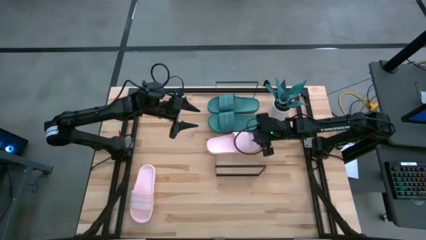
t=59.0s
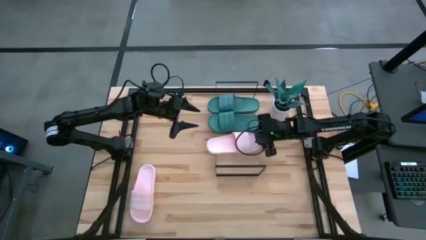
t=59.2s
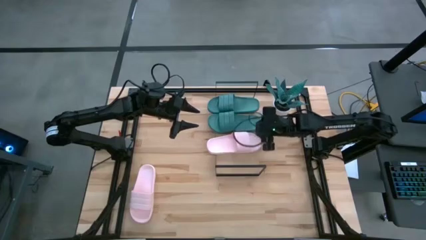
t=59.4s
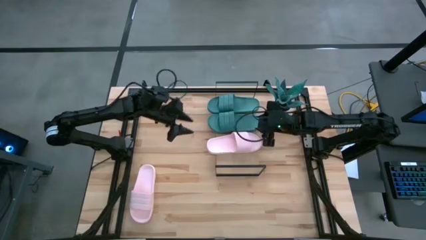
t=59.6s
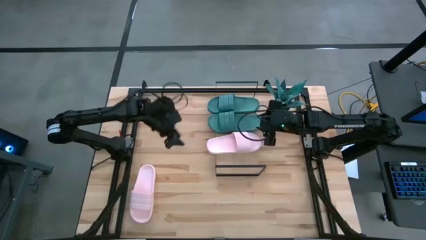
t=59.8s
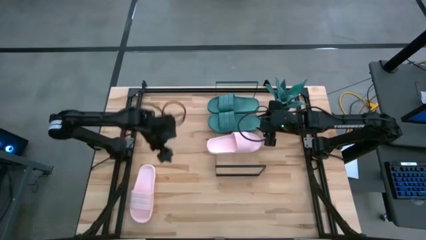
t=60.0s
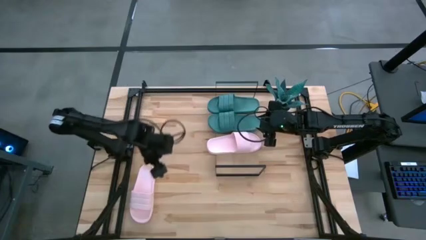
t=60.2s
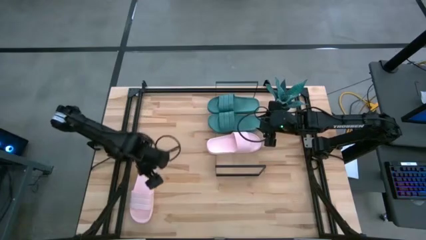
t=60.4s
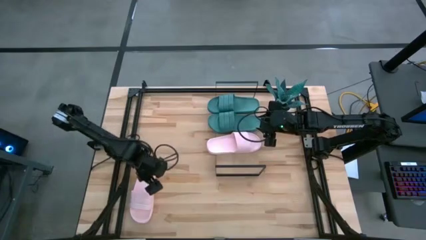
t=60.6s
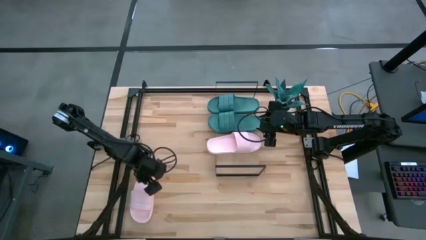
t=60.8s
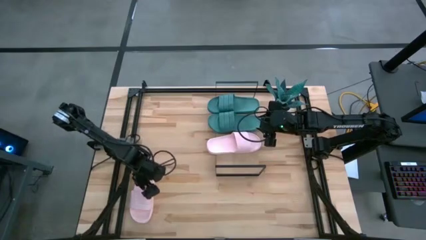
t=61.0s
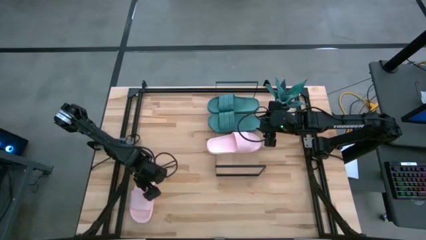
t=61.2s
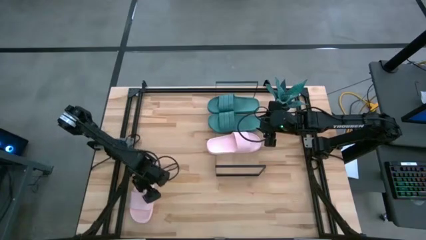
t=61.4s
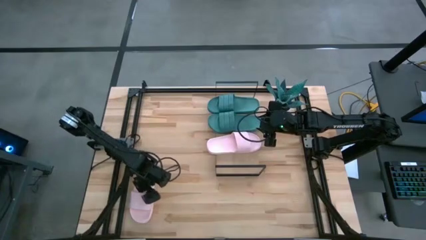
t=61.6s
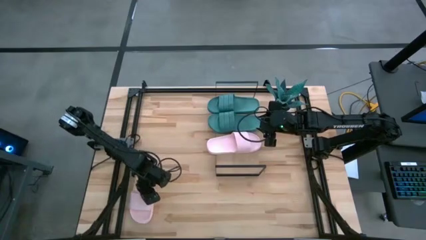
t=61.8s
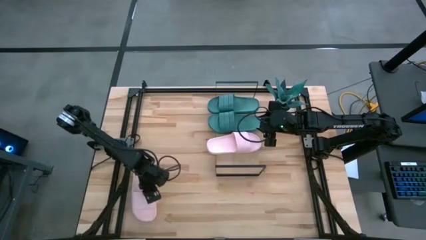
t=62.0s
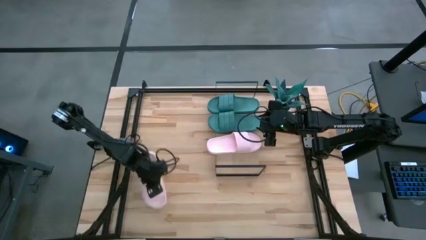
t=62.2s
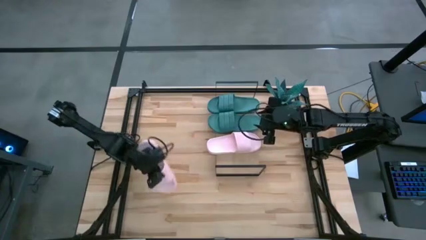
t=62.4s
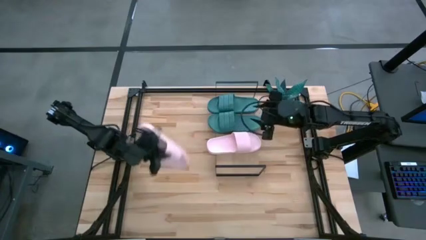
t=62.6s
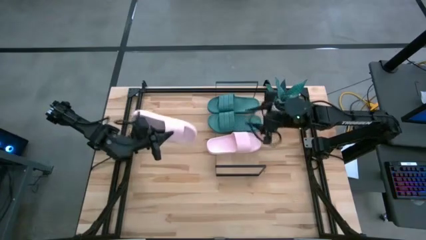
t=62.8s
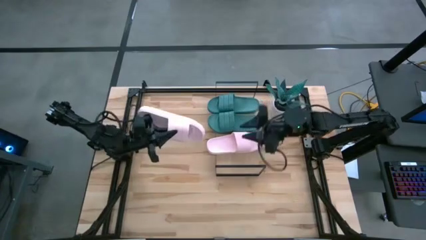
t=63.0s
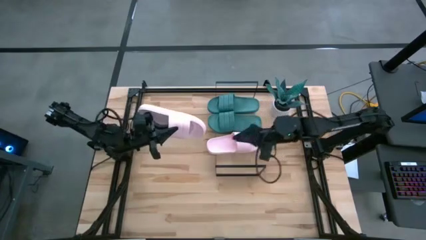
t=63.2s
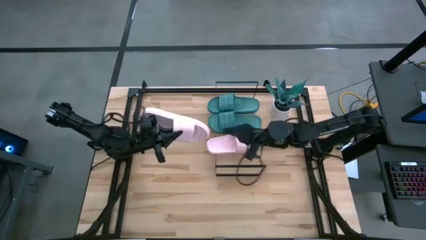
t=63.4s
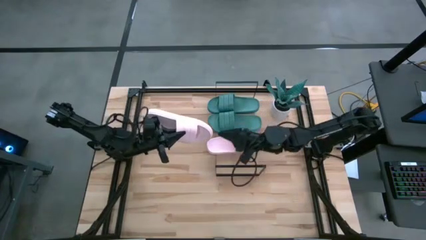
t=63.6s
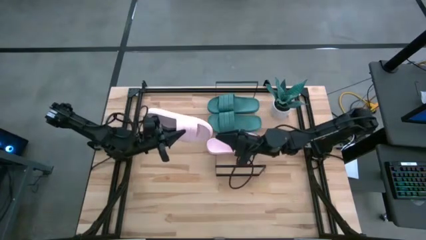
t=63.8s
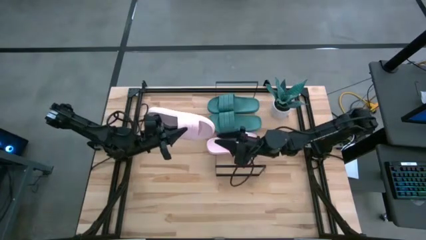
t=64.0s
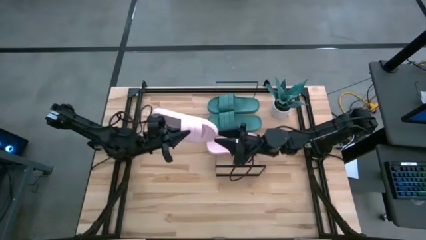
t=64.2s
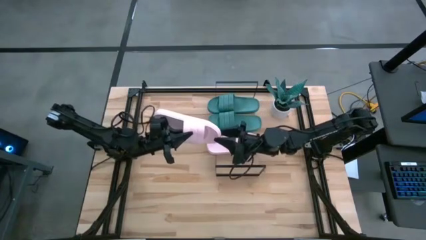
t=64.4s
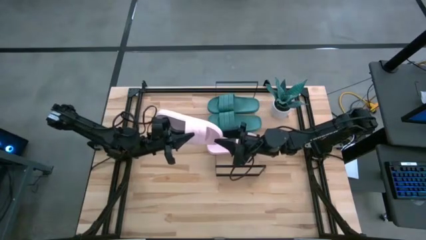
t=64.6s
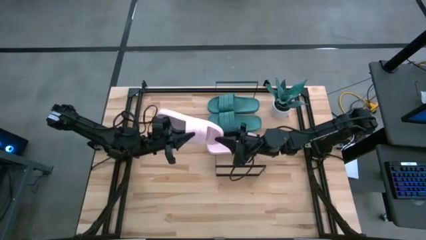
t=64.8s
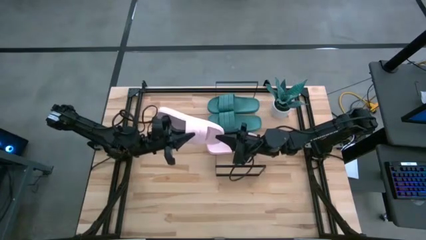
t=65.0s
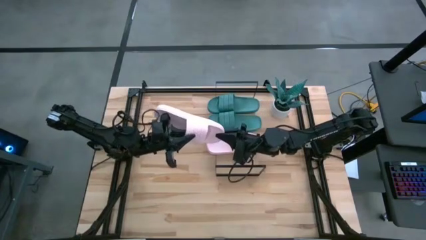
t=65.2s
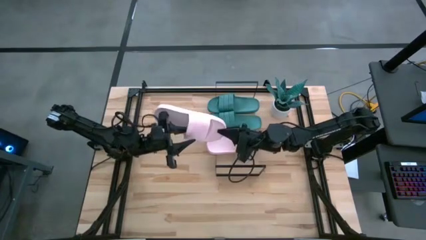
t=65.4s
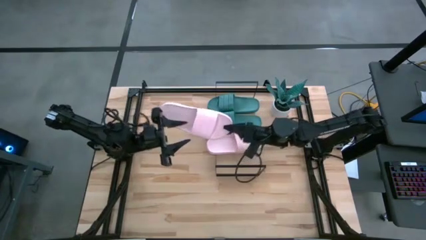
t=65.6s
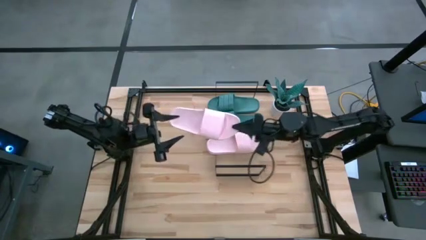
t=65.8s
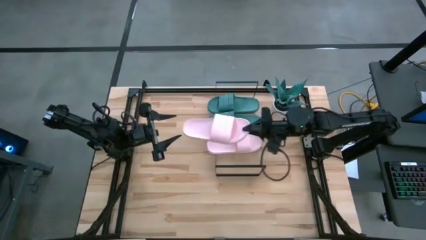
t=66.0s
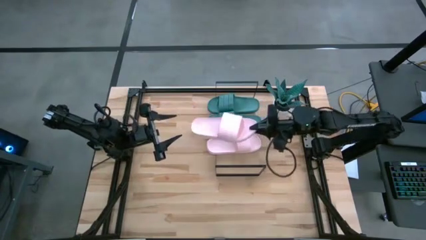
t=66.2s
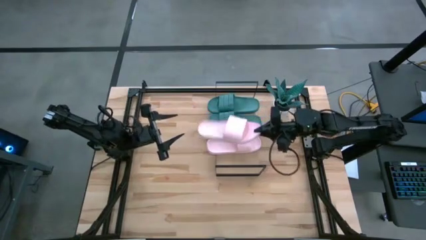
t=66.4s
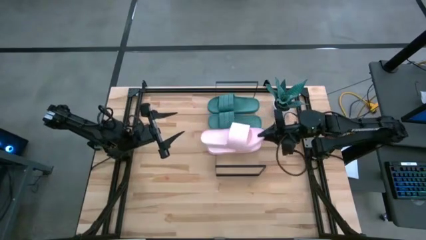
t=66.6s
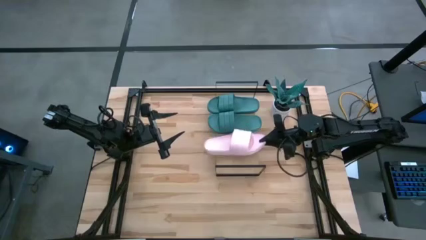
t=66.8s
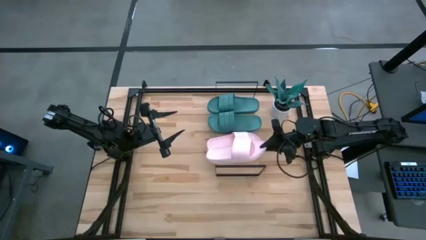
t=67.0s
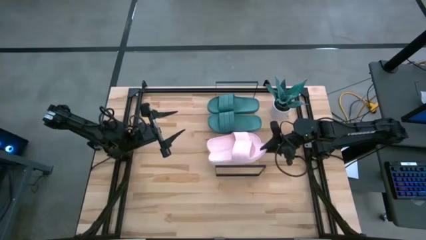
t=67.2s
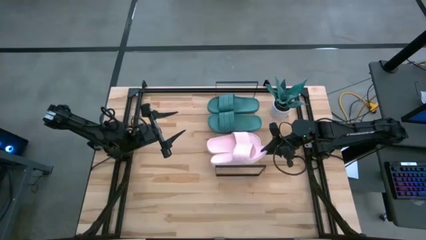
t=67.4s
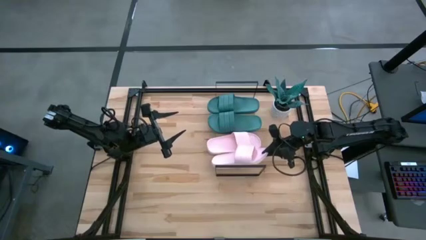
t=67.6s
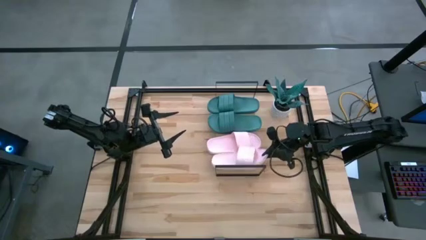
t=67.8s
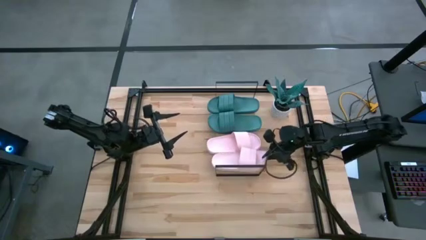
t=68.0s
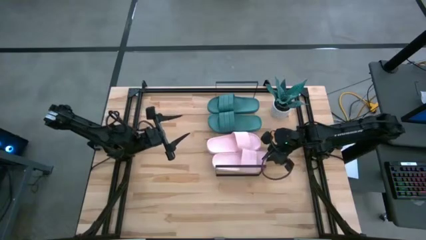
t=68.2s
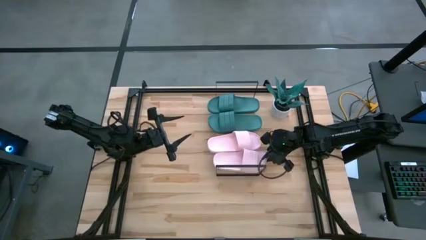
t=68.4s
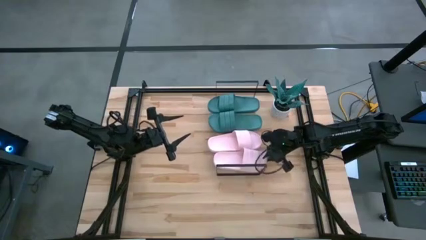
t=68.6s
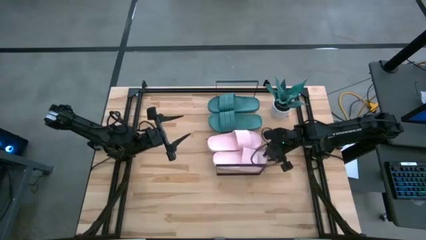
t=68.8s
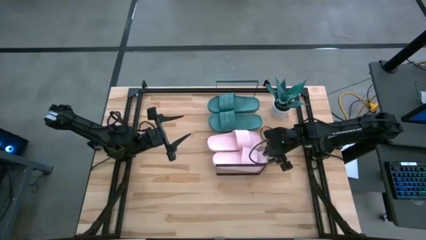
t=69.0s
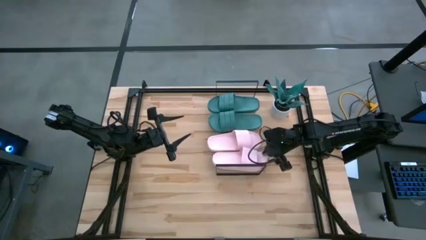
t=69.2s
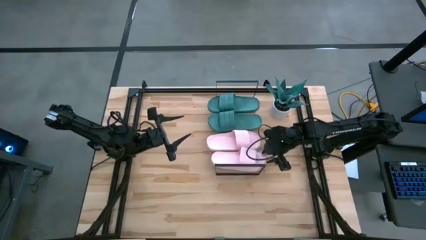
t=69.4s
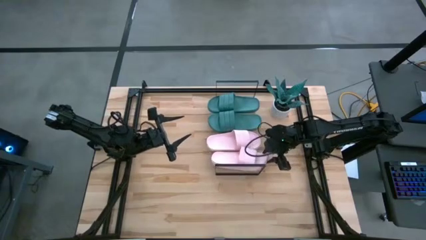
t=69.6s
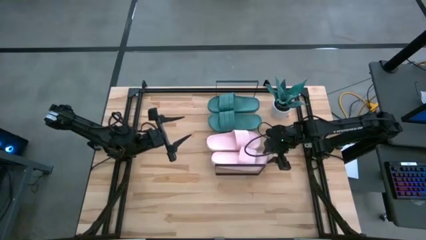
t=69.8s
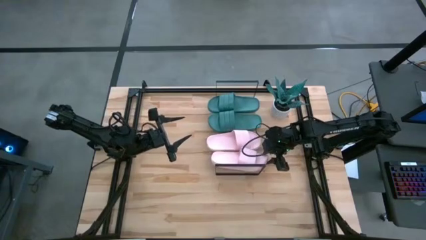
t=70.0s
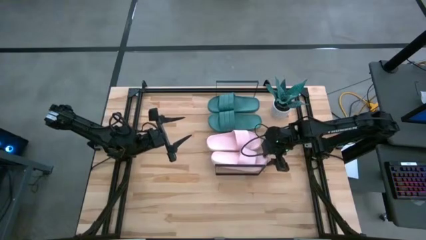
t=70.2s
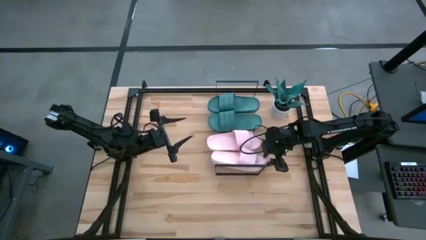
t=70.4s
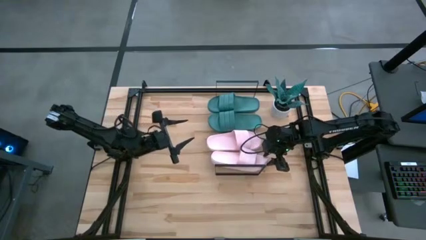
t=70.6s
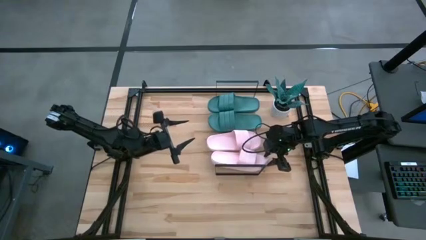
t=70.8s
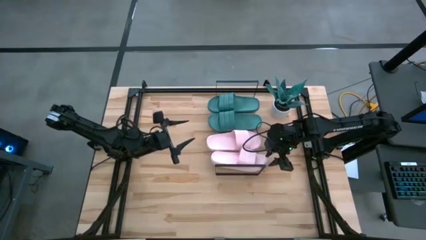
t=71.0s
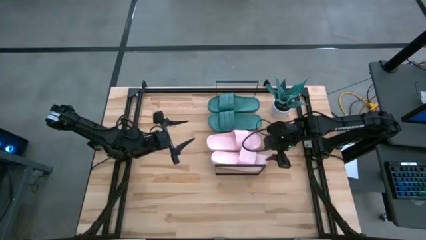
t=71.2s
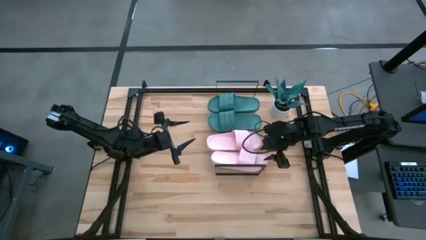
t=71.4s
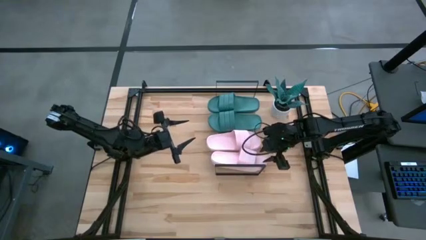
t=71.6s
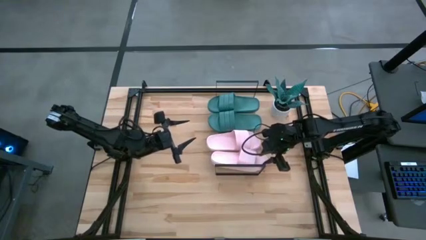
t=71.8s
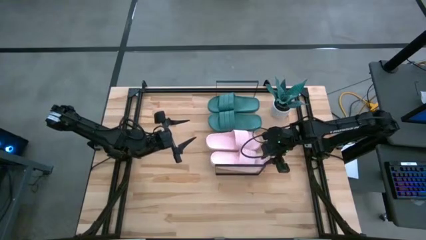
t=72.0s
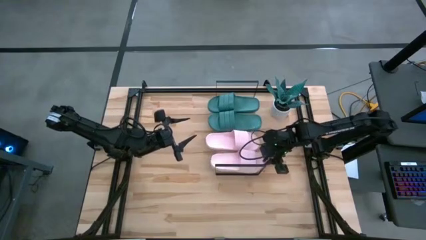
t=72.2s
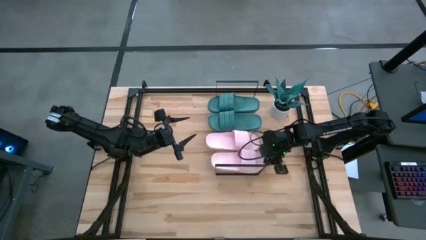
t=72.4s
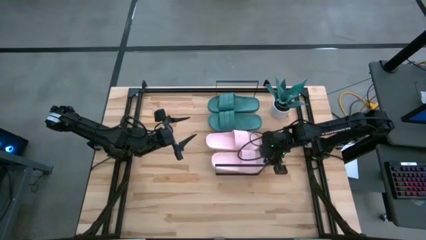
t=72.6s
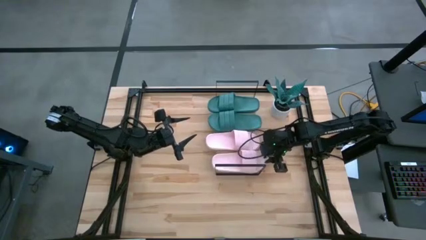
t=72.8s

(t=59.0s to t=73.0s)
Task: Pick and place slides into the shelf
Put the pink slide on the shelf

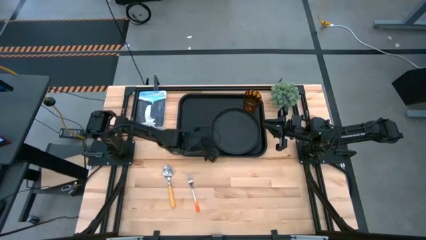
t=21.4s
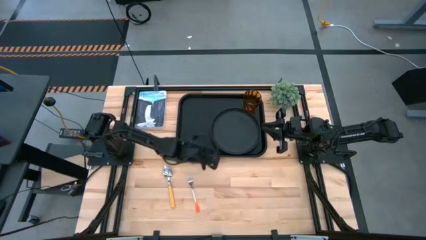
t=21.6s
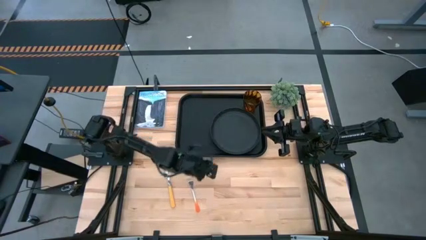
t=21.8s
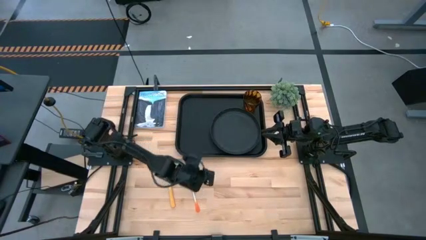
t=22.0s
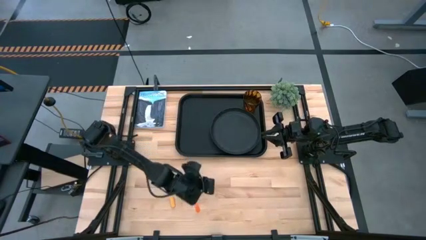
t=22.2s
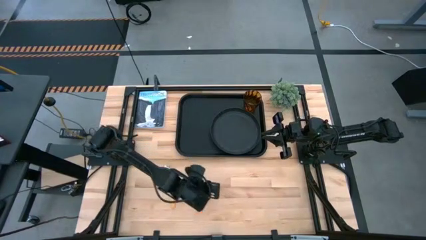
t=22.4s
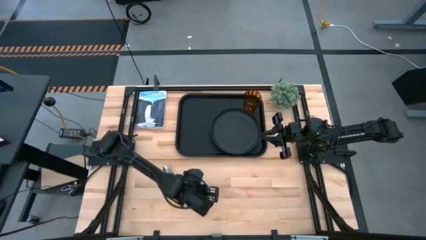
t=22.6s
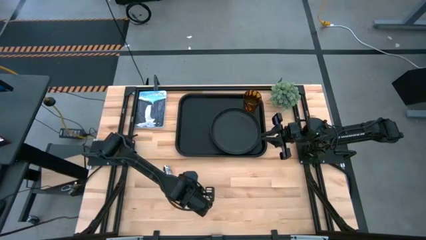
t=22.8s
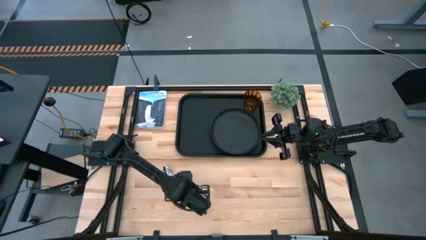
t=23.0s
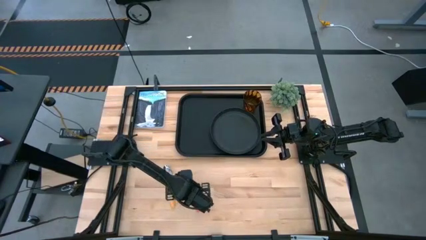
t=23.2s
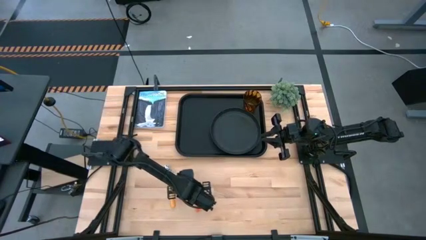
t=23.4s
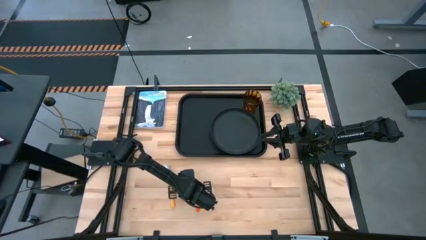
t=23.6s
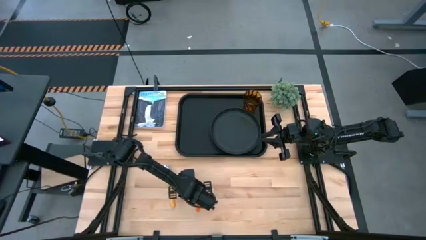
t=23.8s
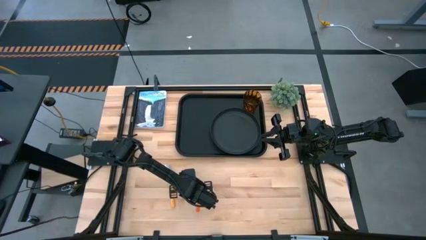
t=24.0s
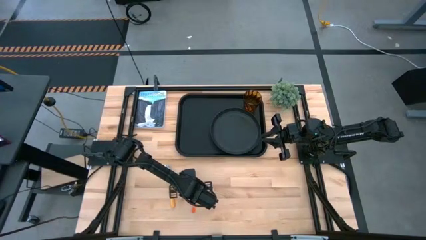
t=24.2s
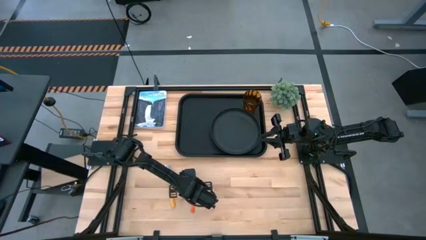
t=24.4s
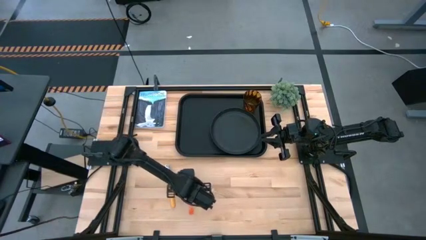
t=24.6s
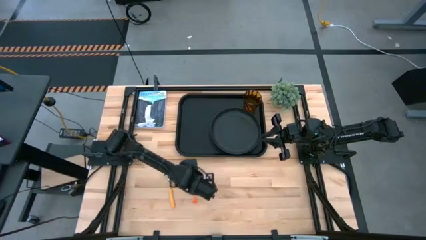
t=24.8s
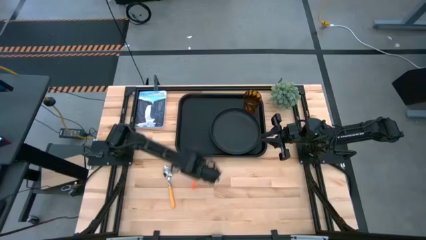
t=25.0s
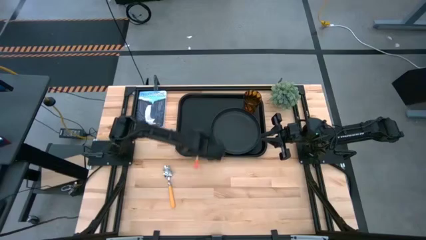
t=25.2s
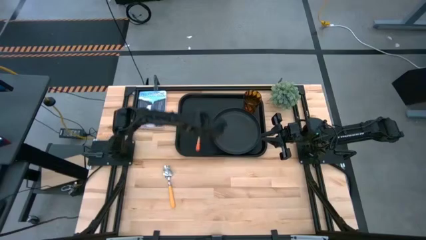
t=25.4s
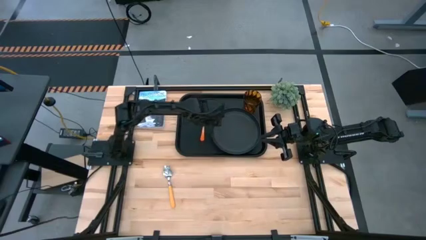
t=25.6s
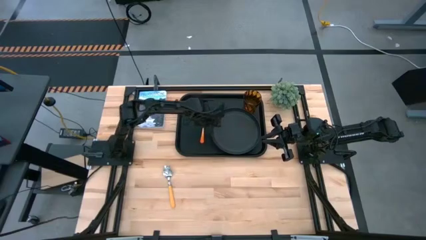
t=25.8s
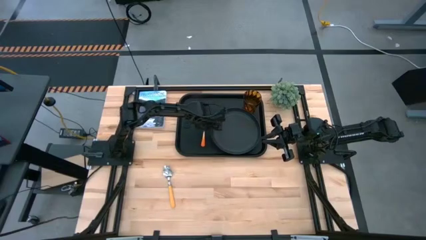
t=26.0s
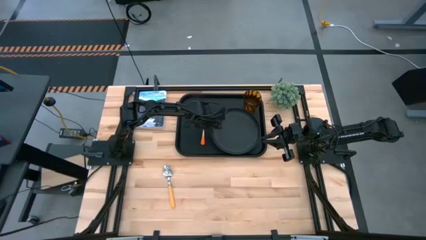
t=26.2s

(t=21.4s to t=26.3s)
Task: Pick and place plate/cup/fork/spoon on tray
Put the orange fork on the black serving tray to the left of the black plate
